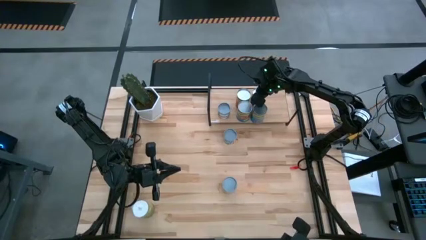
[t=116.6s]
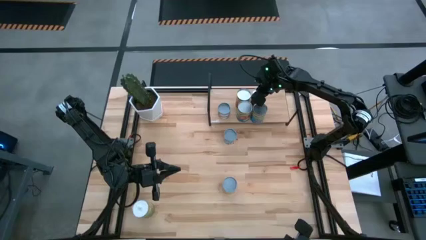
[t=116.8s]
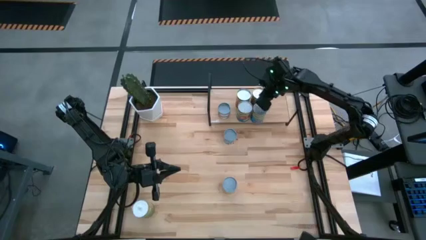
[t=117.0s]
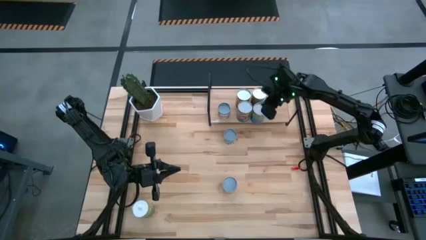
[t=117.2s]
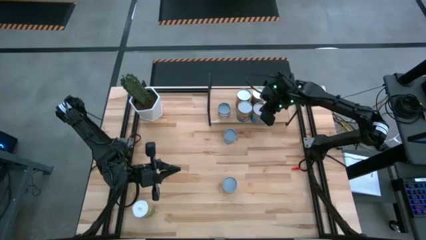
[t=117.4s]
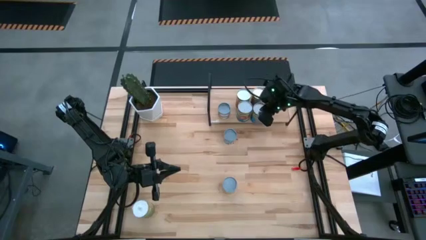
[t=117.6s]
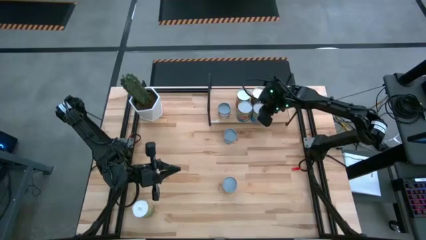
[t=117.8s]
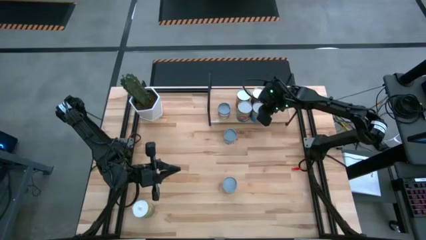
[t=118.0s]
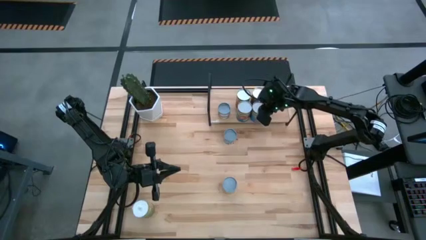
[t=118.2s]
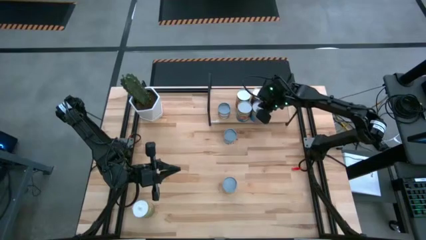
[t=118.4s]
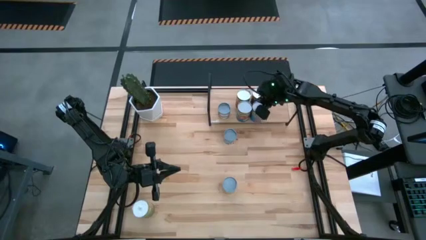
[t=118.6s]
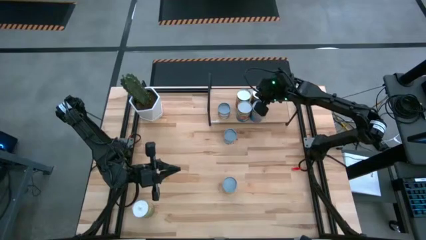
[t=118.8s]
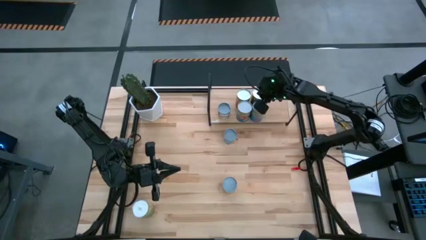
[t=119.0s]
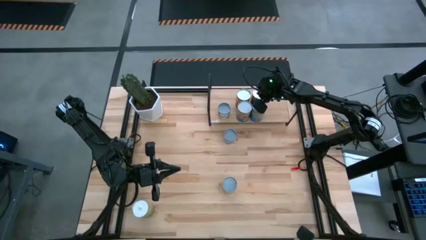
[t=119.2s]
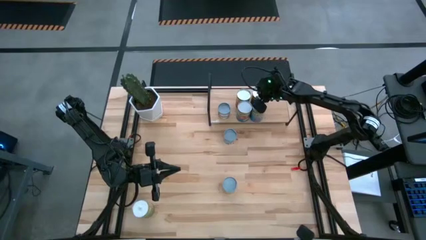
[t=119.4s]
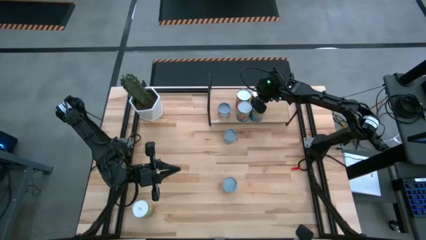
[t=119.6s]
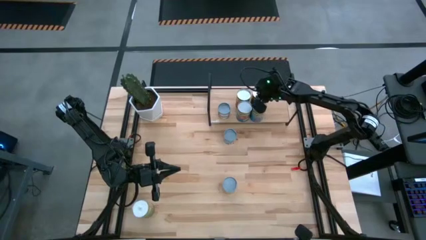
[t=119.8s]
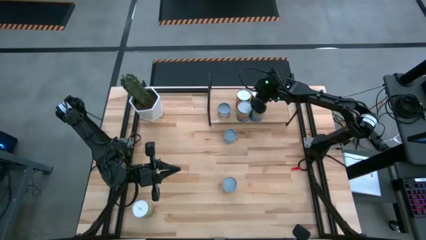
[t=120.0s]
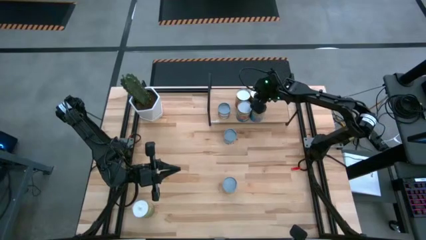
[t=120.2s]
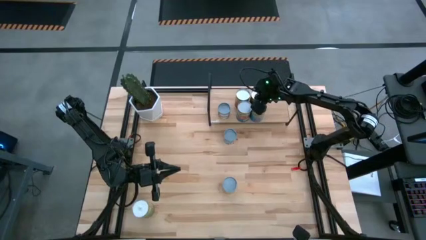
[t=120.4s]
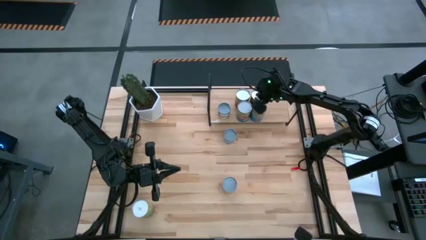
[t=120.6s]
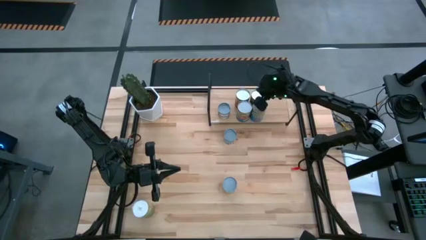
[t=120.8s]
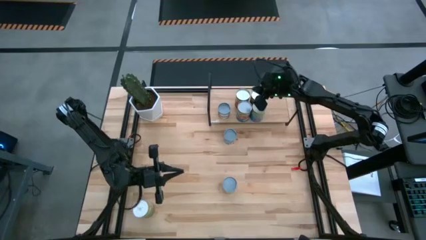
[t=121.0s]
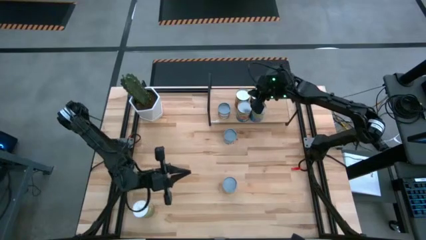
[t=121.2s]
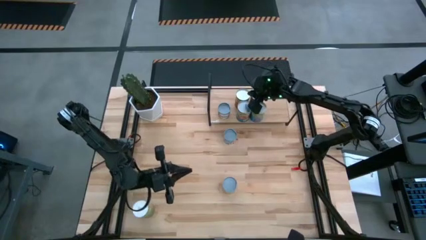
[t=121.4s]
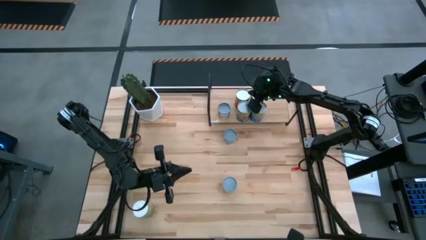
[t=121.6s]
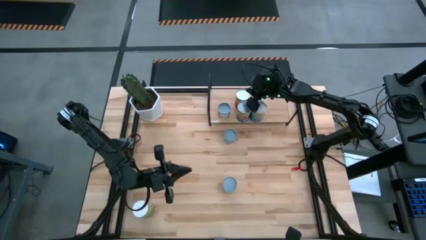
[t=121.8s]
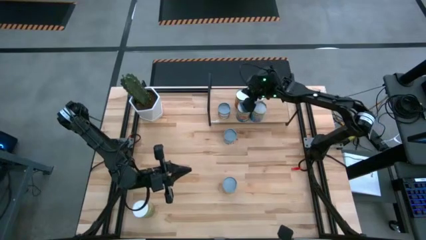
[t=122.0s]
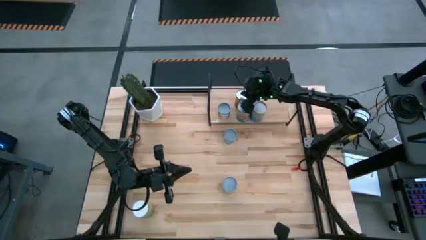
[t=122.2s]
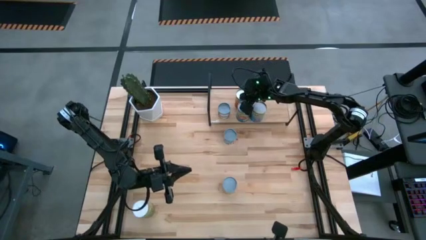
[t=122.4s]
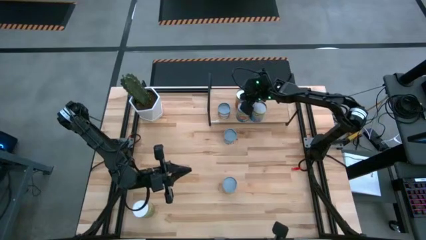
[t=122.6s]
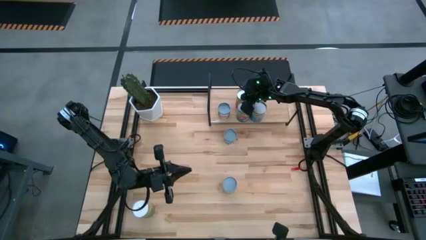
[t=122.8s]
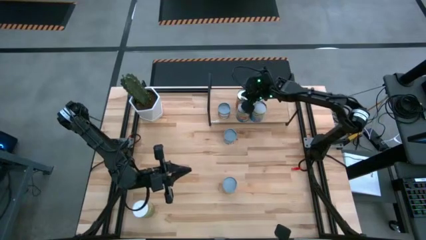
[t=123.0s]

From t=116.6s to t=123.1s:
Task: Pick and place cans onto a shelf
Adjust the canned goods on the shelf

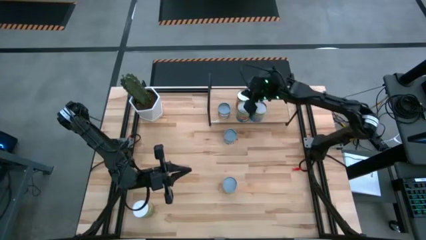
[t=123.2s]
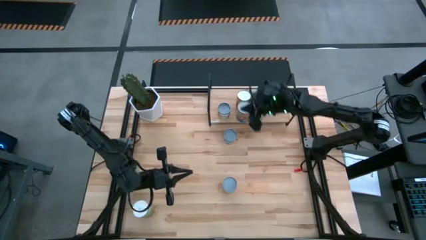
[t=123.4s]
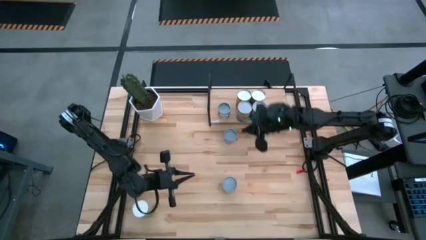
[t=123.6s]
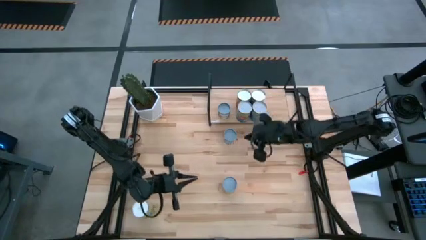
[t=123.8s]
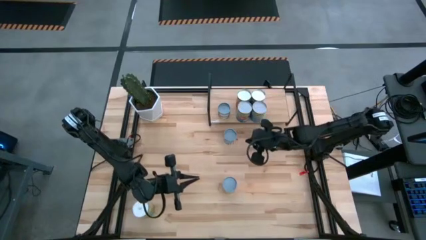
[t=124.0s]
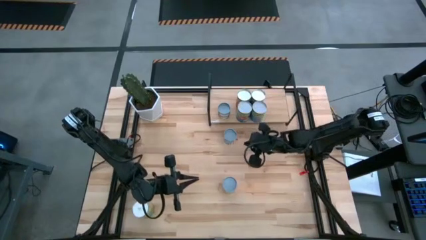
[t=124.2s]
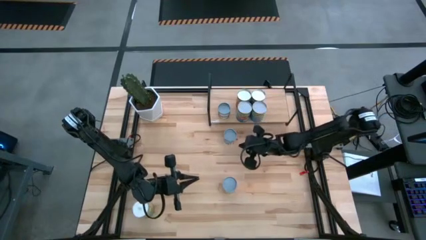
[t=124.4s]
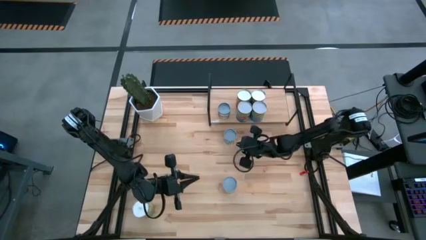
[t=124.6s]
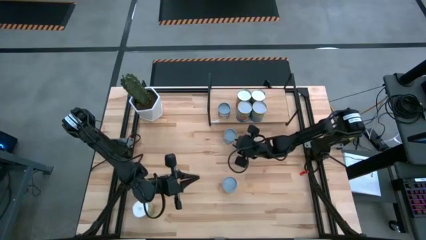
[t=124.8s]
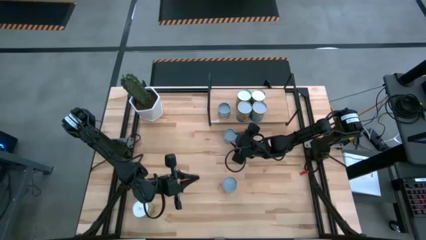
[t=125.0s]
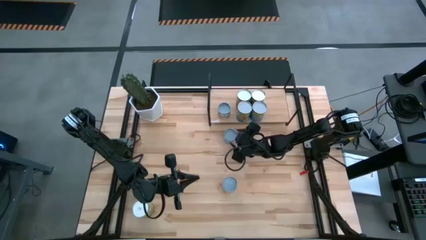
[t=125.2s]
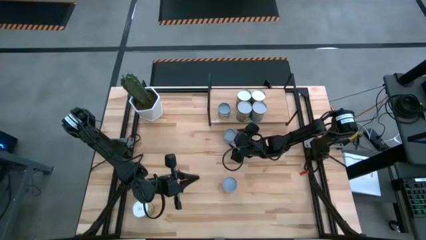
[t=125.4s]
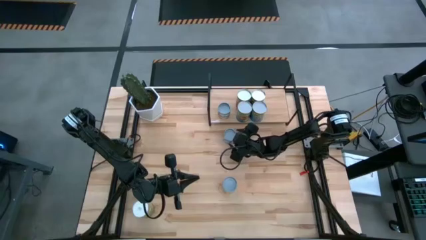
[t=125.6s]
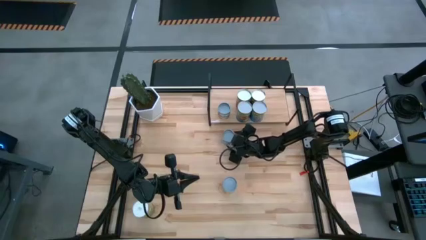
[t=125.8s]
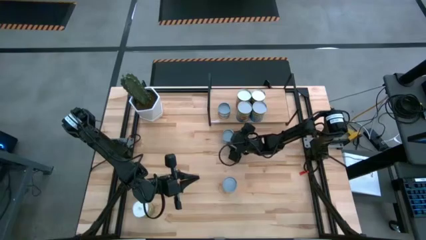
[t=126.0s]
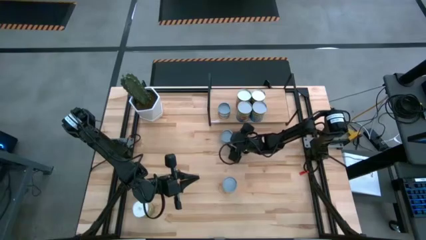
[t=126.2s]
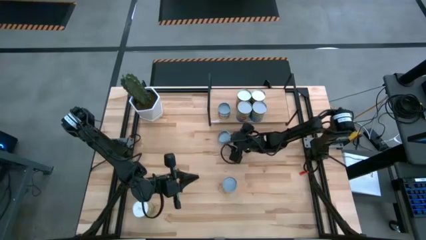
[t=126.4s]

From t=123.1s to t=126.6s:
Put the canned carrots on the shelf
